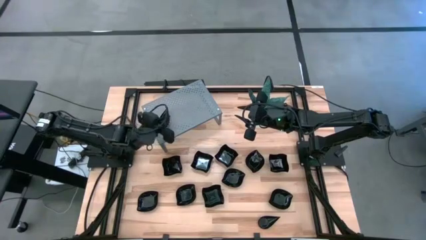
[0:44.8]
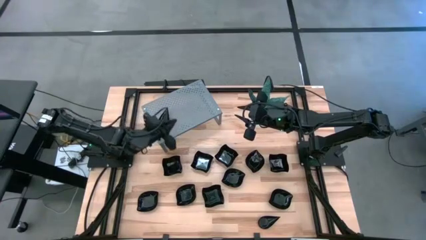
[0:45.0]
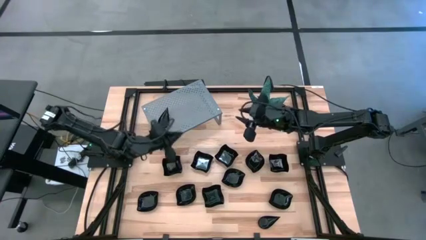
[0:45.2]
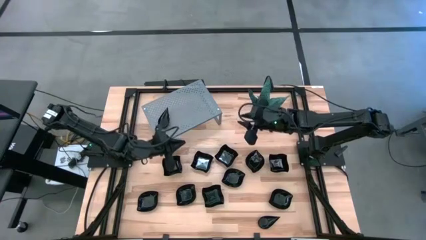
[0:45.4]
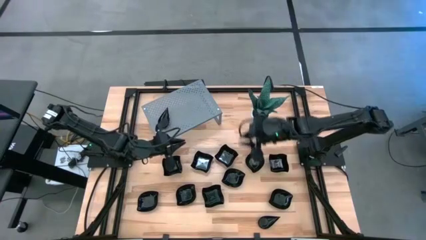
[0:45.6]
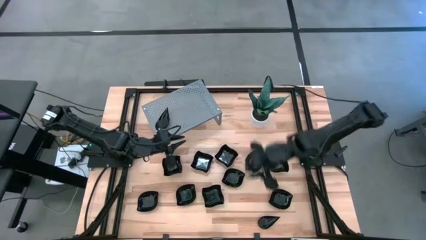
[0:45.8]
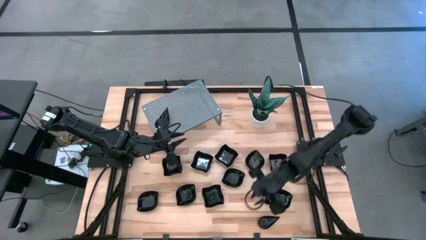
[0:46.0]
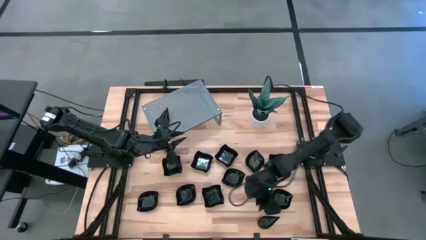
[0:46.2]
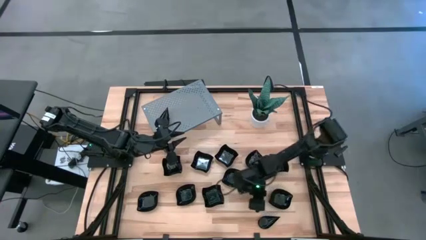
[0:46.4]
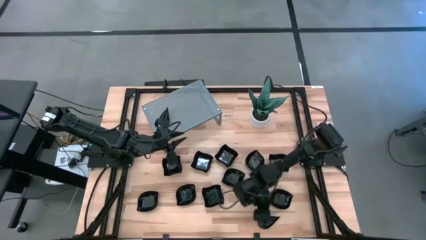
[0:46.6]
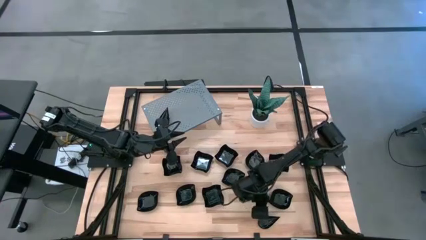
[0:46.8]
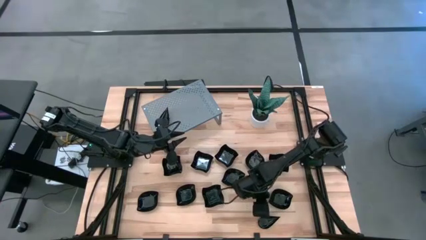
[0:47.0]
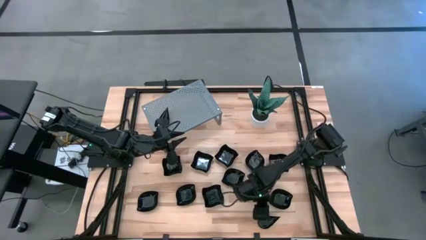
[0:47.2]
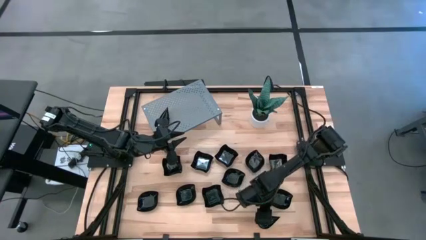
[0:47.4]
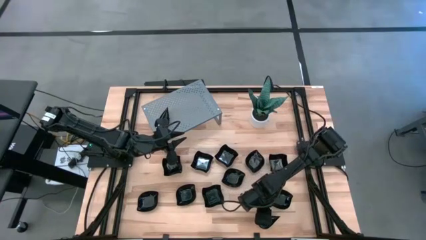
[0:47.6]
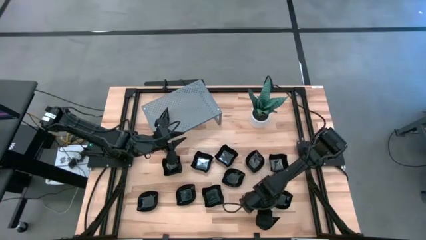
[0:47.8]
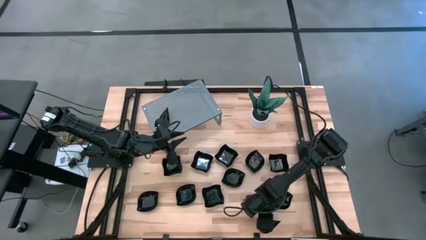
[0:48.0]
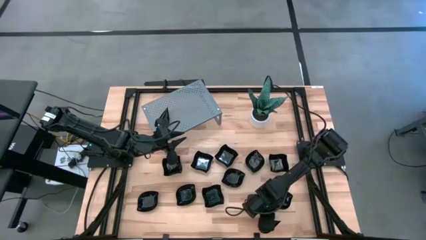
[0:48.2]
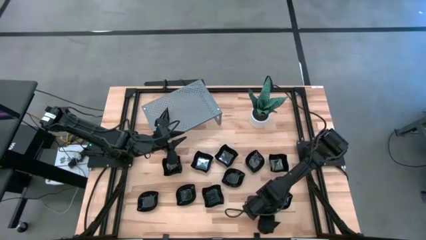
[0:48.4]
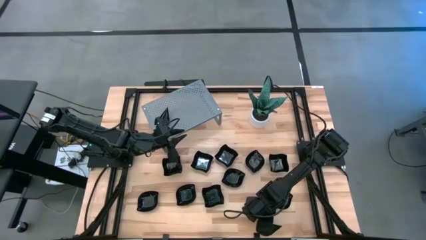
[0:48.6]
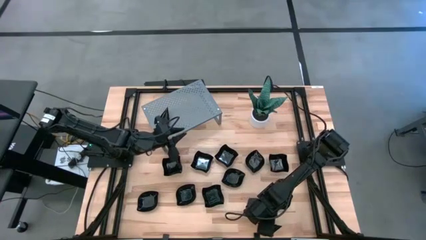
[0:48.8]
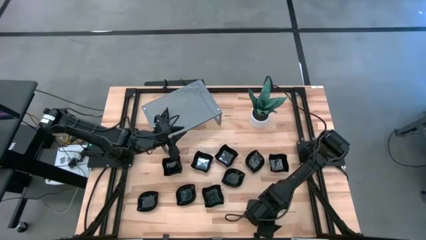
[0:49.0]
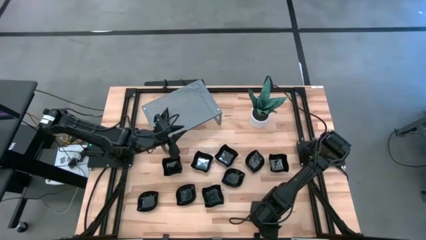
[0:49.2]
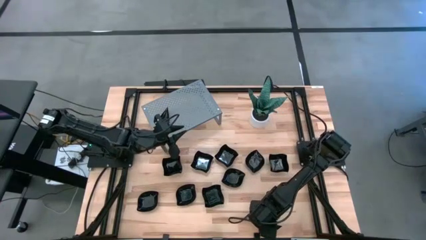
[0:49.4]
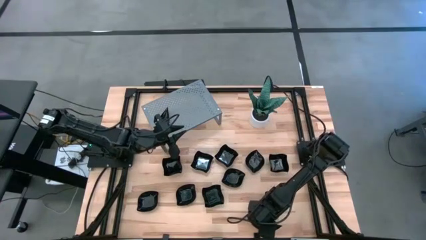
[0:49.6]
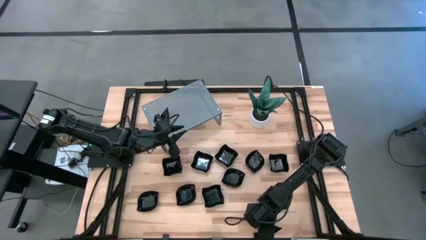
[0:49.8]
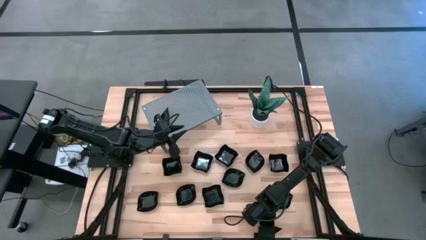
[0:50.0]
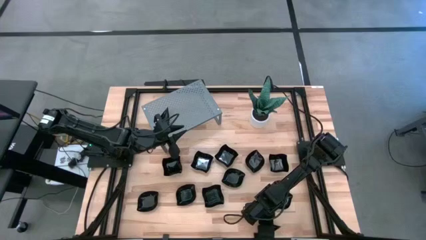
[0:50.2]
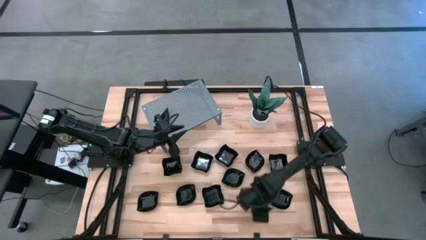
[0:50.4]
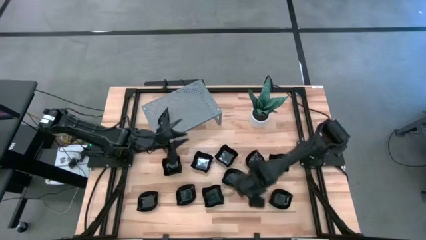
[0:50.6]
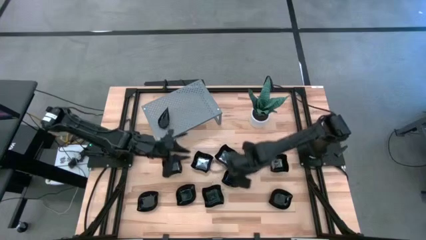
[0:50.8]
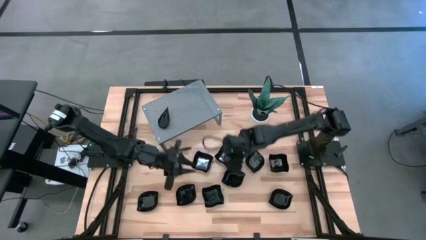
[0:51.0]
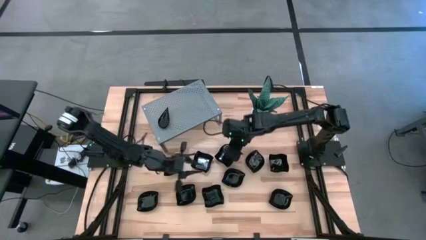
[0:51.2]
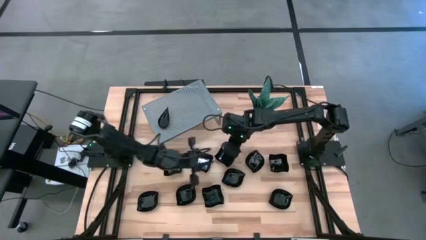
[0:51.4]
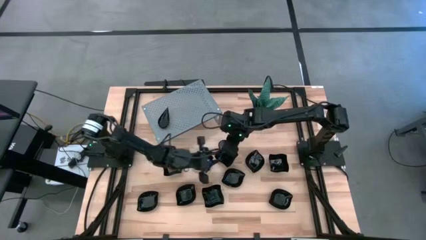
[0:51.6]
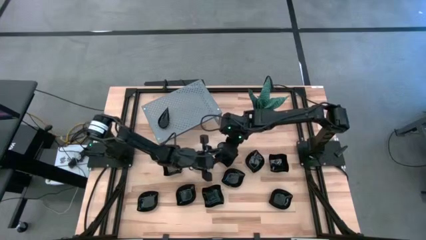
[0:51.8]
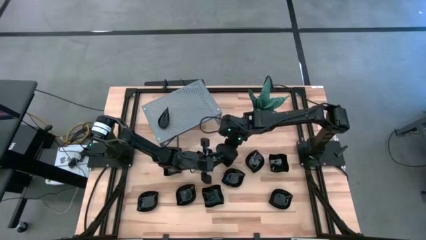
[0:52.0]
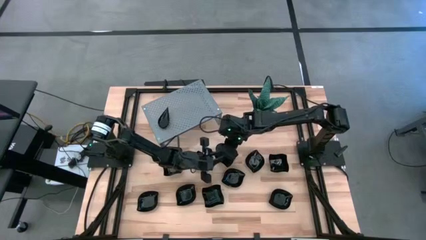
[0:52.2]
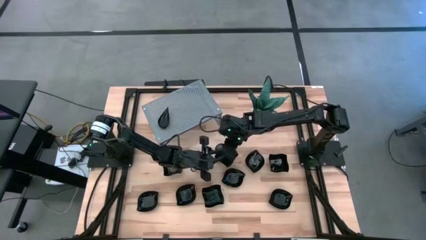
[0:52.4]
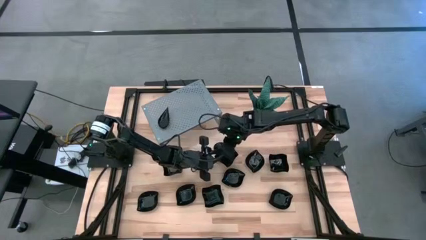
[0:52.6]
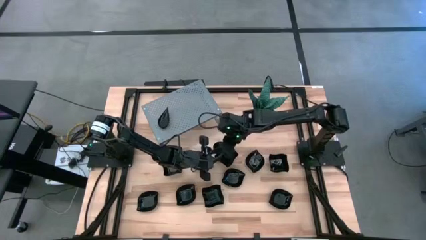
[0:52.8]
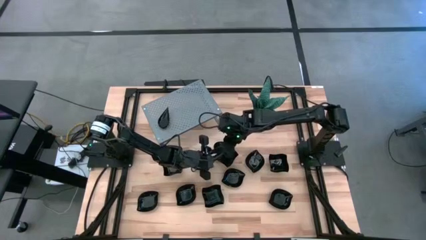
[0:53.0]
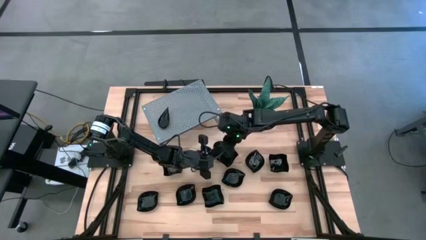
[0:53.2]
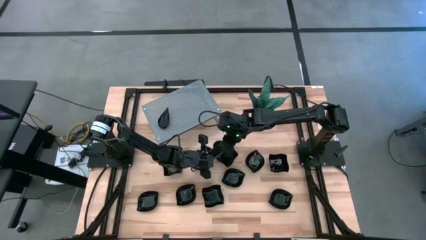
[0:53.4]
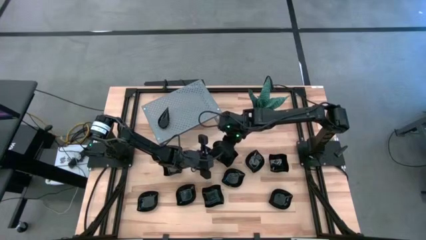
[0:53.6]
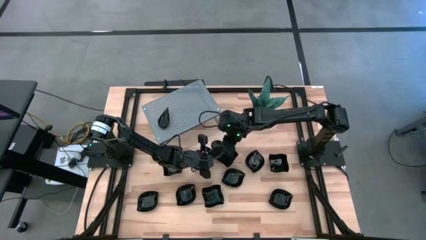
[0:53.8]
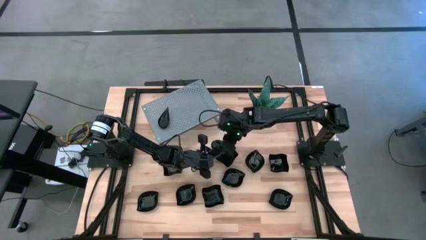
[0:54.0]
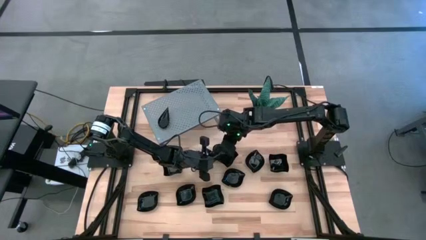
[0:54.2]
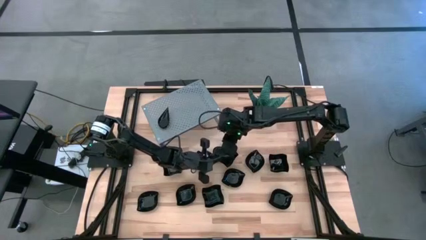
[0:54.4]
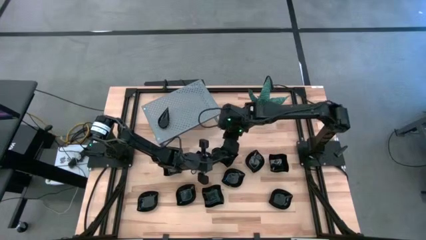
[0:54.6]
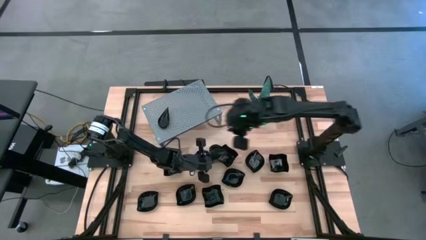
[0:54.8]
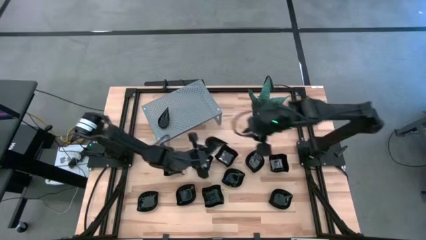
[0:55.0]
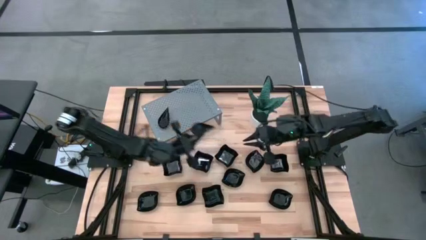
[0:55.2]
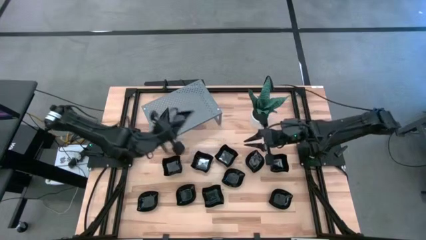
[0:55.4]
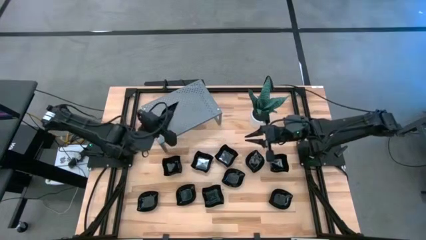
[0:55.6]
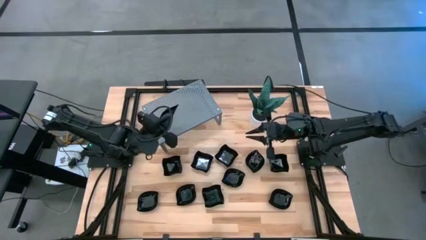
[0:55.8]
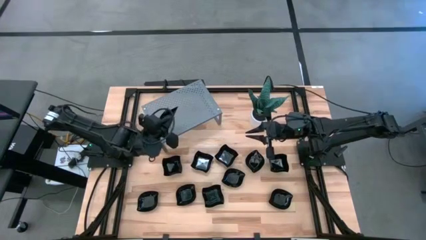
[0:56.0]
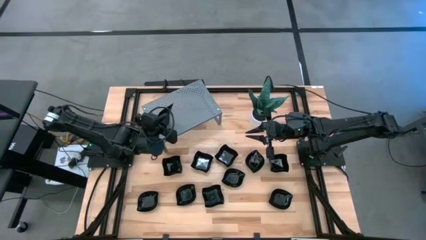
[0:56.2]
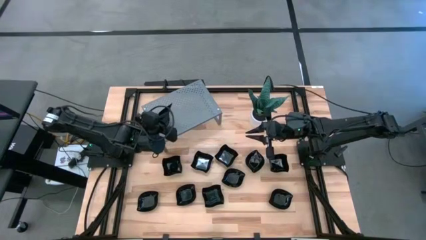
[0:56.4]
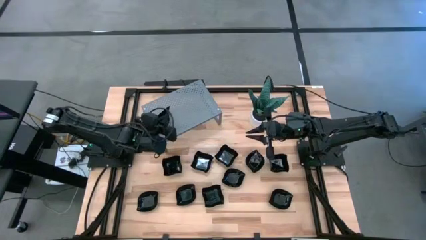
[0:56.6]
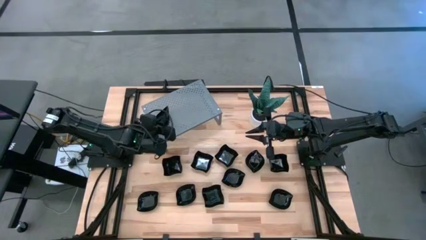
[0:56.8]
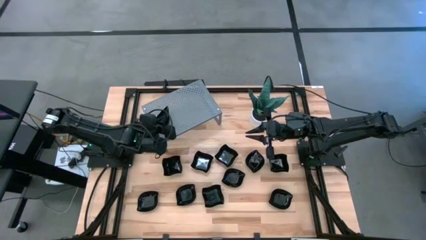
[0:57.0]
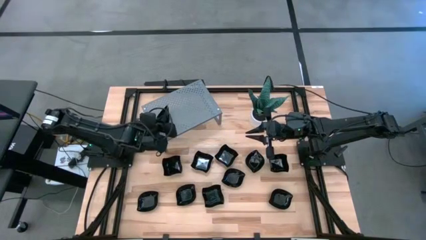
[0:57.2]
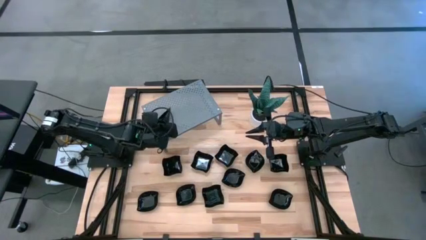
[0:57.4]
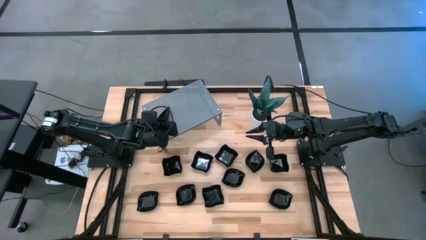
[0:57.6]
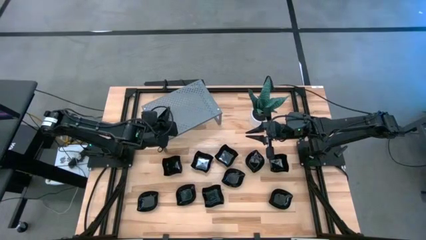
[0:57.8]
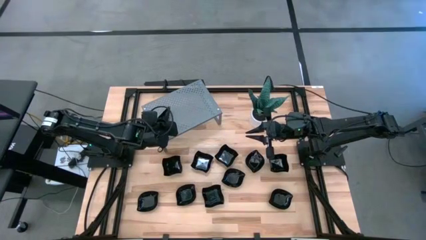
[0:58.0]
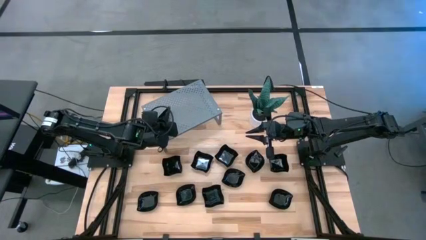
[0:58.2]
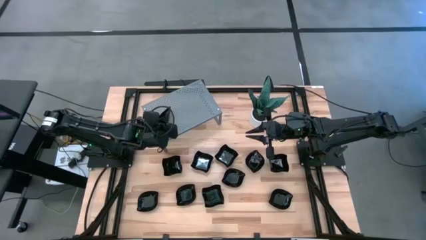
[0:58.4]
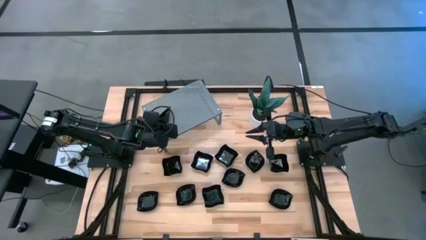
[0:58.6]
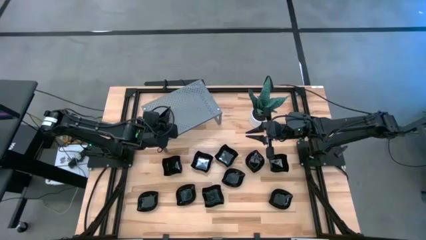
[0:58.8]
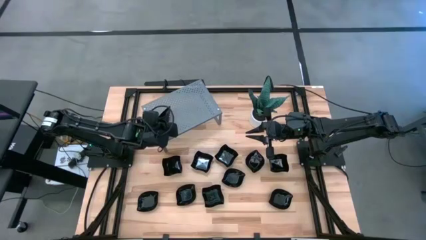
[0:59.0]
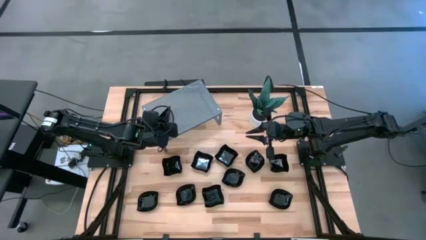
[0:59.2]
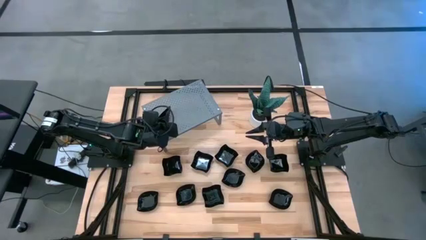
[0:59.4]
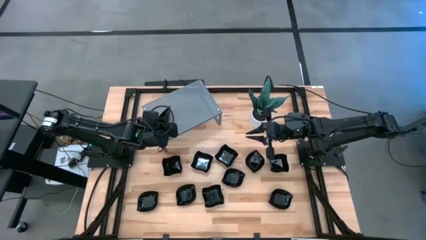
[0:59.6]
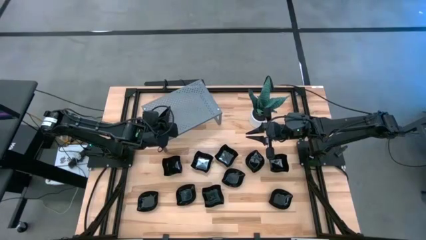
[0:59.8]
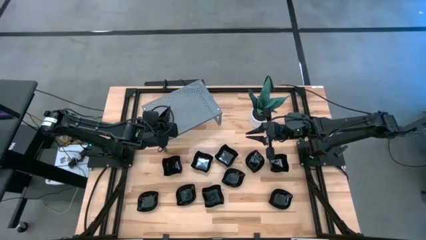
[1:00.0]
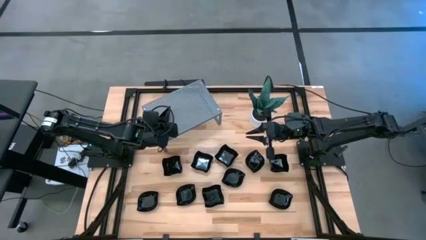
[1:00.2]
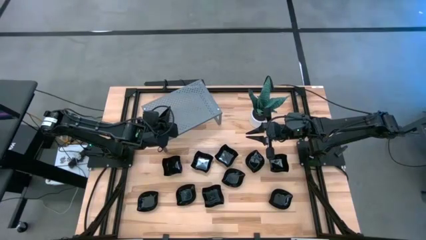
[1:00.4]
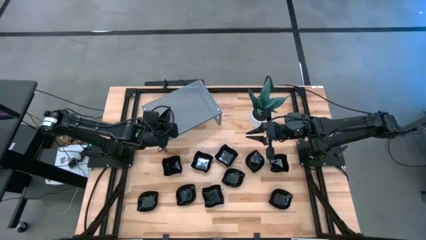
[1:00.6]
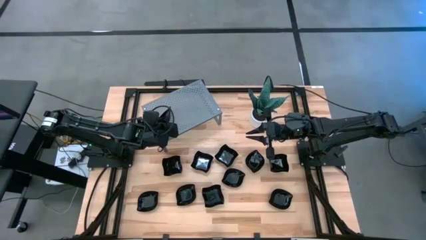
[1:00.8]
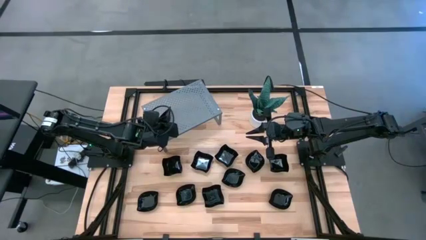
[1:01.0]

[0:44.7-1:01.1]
Task: Pick & Place Mini shaped plates
Stack the black drop-shaped plate on the black drop-shaped plate on the shelf
